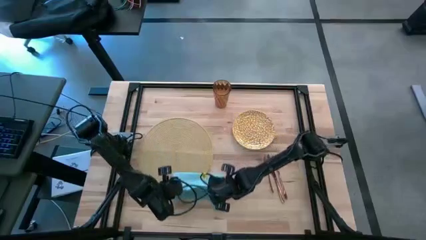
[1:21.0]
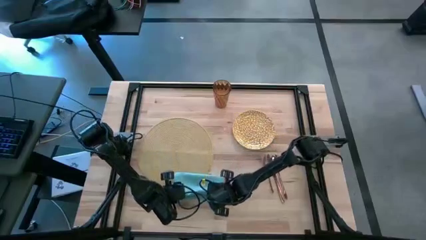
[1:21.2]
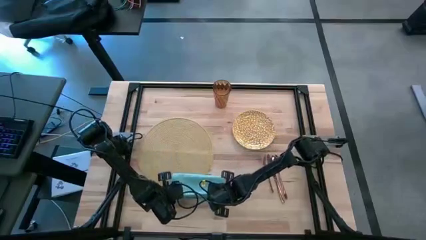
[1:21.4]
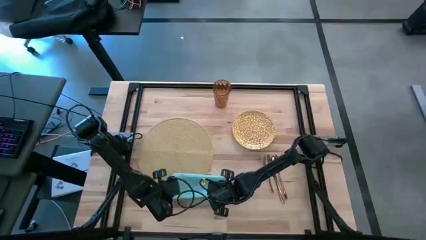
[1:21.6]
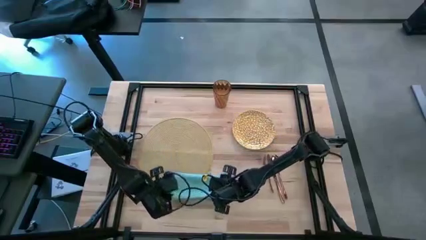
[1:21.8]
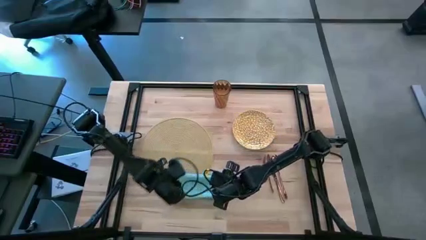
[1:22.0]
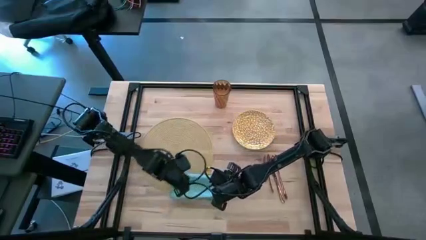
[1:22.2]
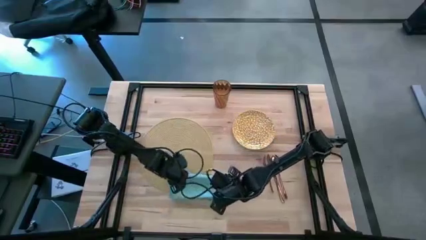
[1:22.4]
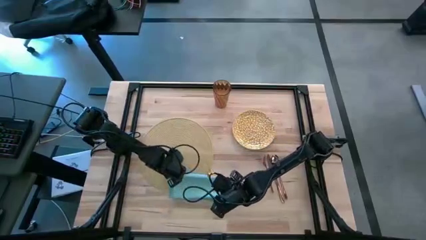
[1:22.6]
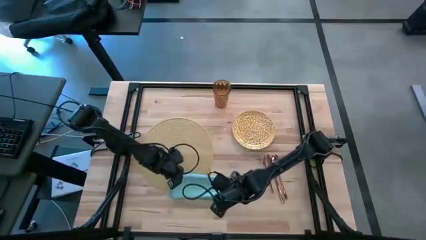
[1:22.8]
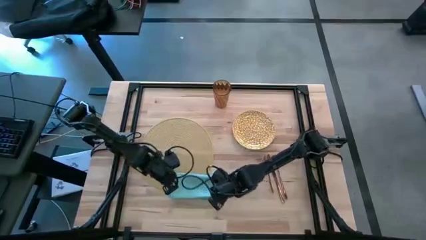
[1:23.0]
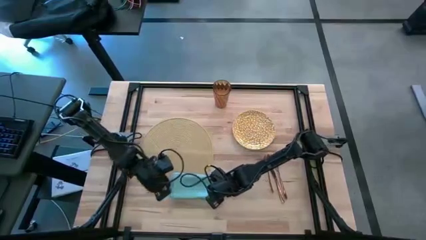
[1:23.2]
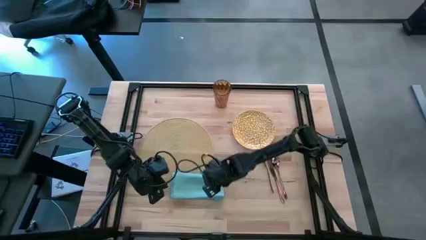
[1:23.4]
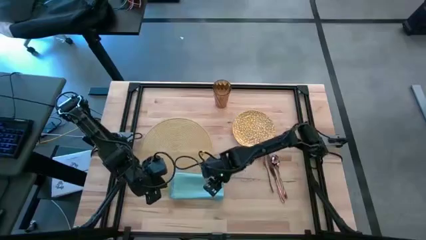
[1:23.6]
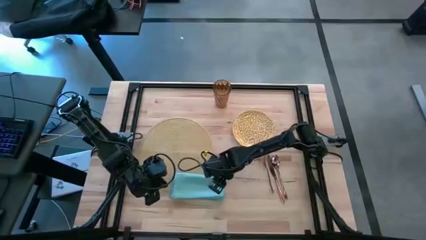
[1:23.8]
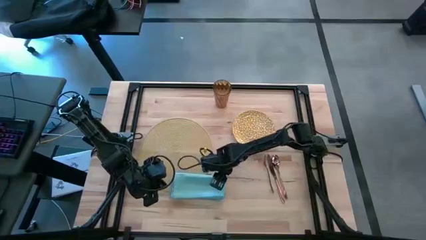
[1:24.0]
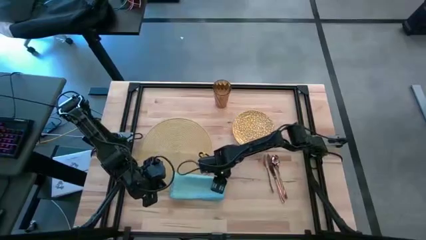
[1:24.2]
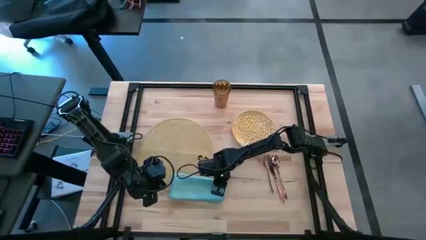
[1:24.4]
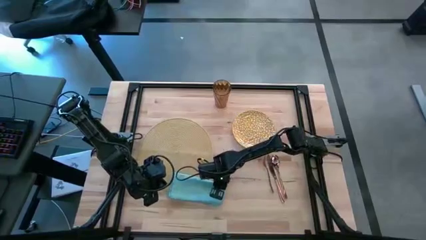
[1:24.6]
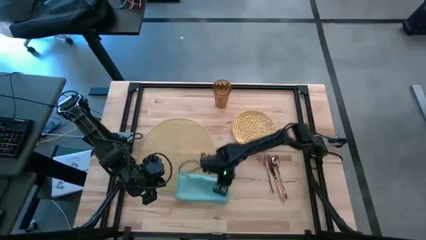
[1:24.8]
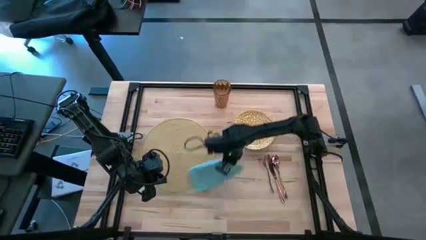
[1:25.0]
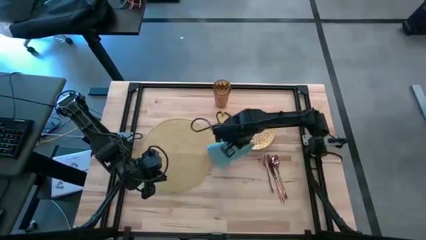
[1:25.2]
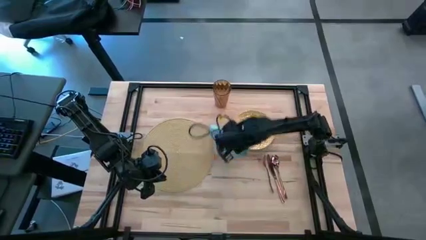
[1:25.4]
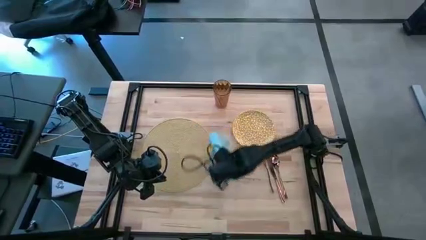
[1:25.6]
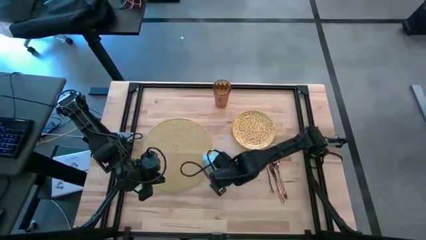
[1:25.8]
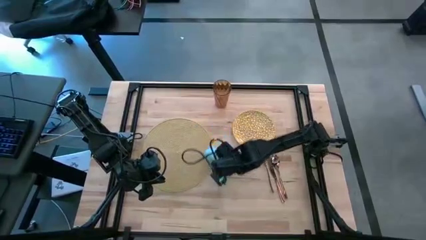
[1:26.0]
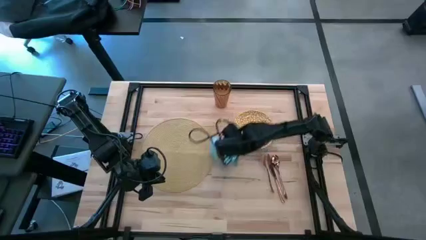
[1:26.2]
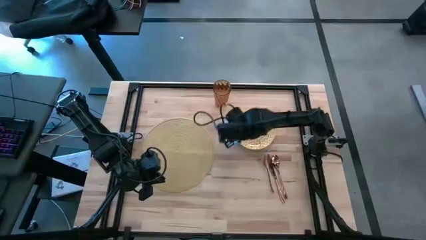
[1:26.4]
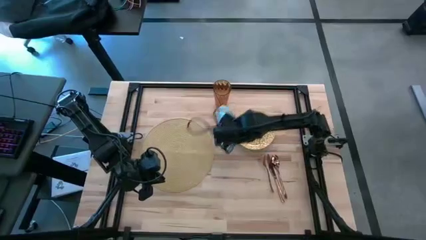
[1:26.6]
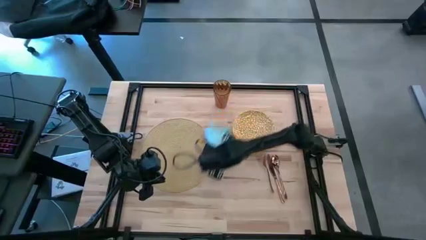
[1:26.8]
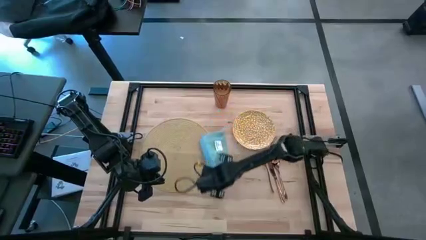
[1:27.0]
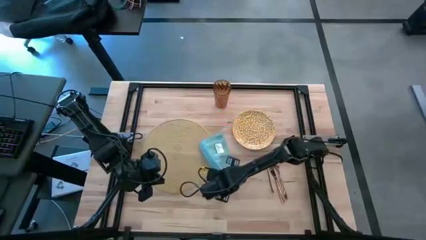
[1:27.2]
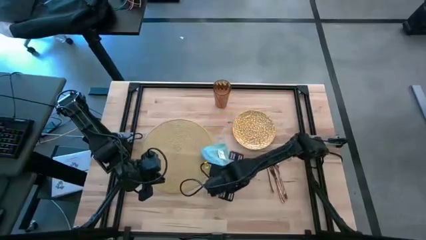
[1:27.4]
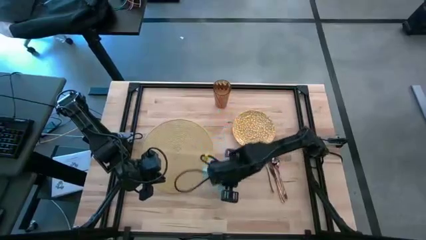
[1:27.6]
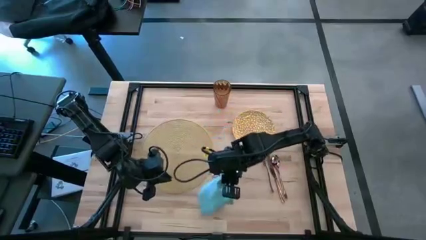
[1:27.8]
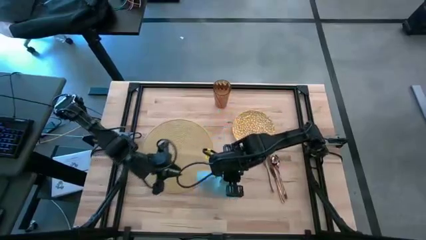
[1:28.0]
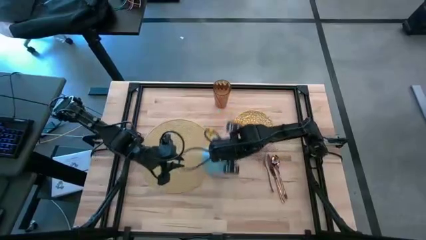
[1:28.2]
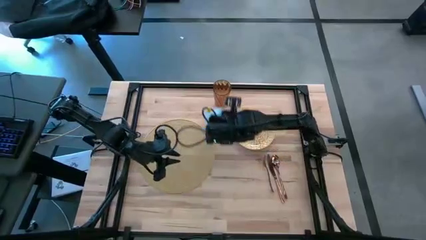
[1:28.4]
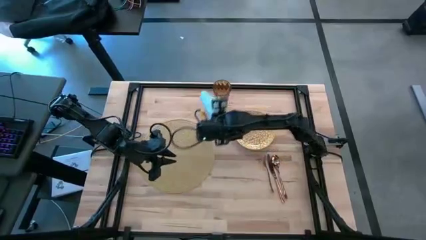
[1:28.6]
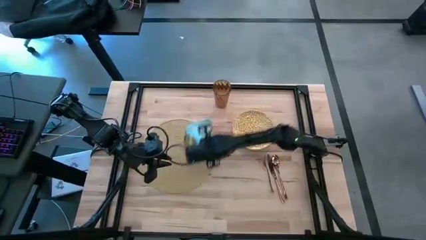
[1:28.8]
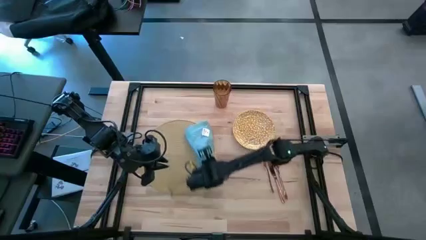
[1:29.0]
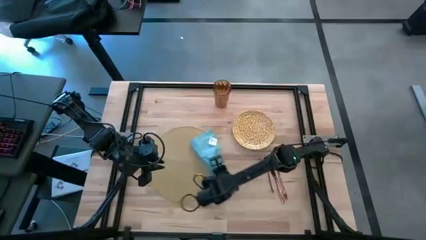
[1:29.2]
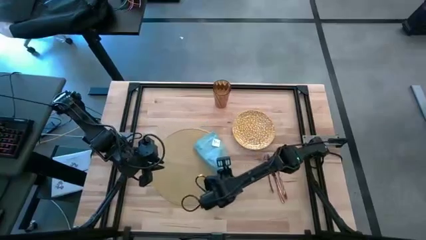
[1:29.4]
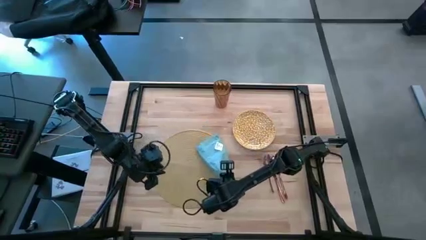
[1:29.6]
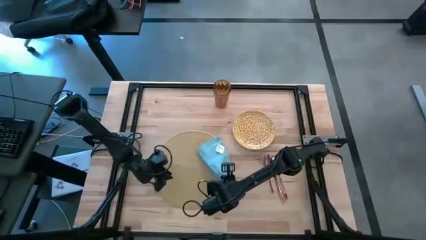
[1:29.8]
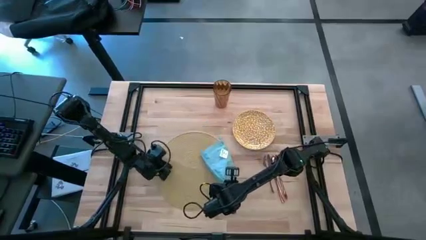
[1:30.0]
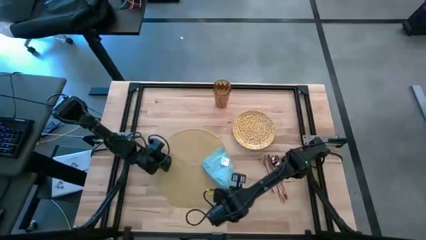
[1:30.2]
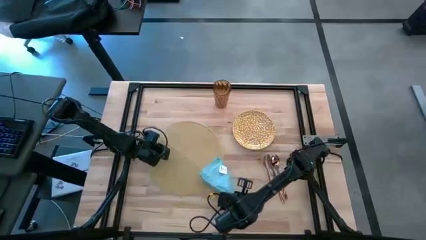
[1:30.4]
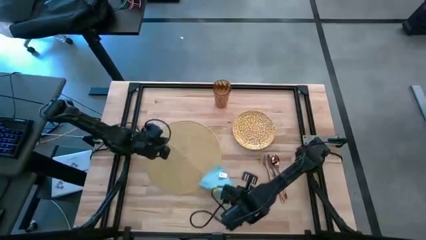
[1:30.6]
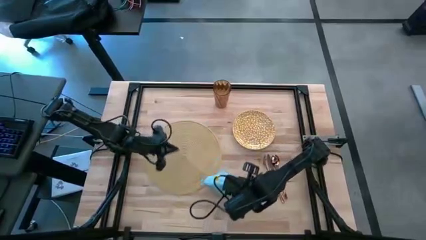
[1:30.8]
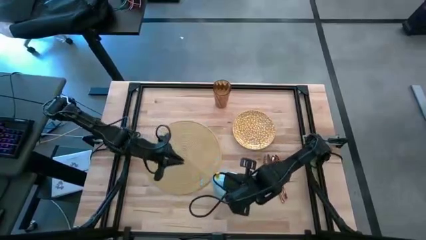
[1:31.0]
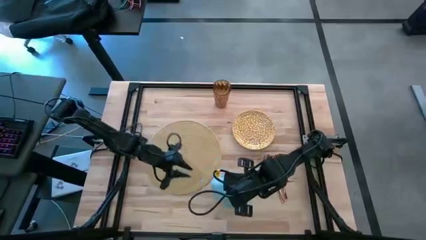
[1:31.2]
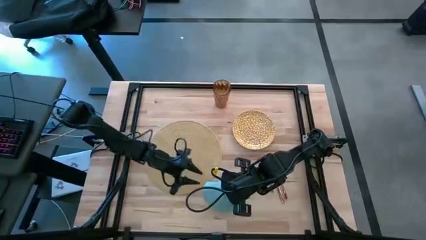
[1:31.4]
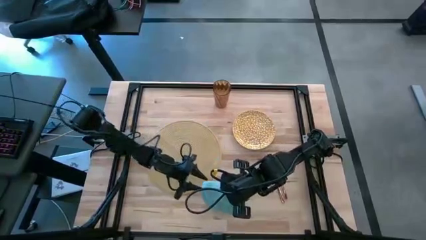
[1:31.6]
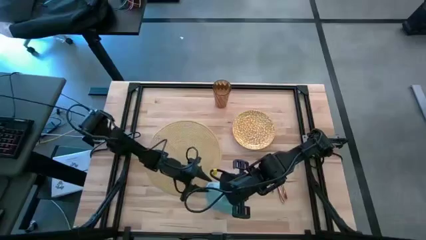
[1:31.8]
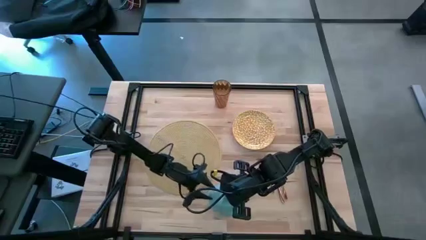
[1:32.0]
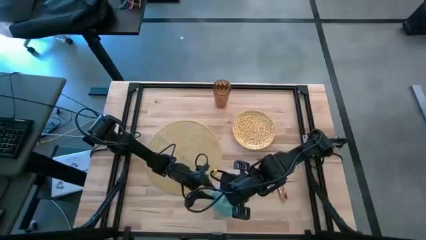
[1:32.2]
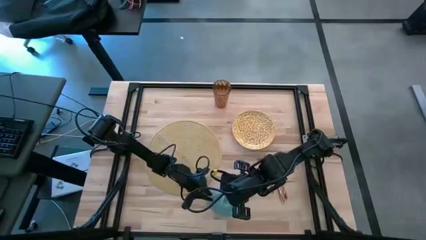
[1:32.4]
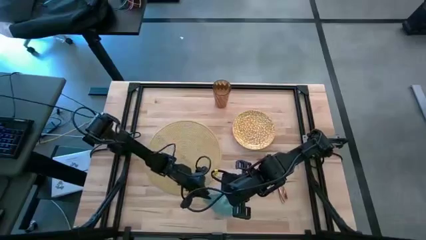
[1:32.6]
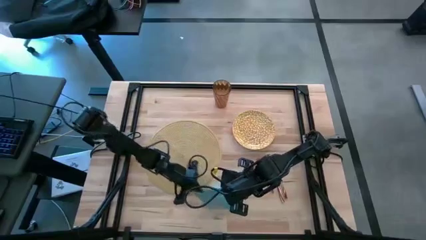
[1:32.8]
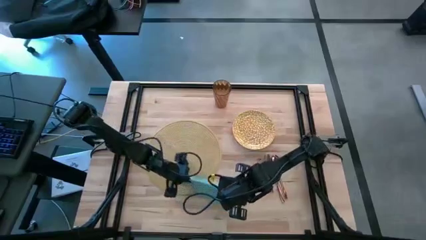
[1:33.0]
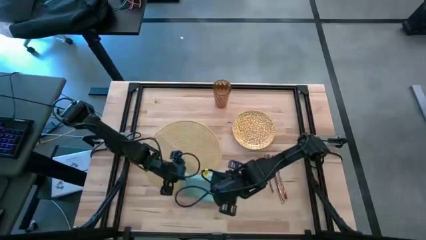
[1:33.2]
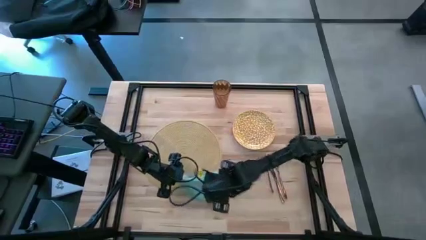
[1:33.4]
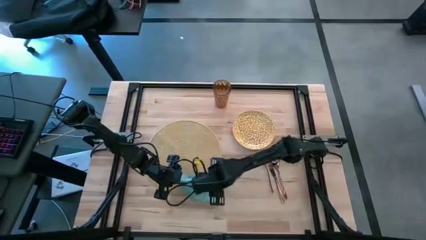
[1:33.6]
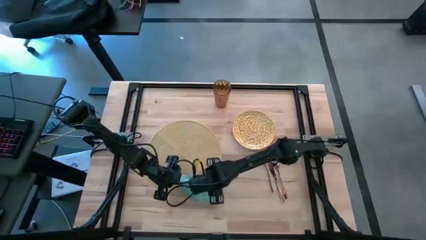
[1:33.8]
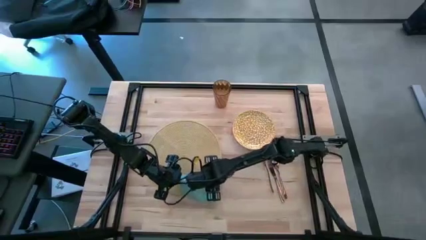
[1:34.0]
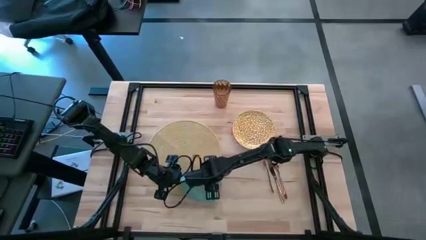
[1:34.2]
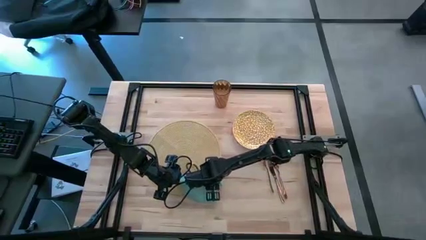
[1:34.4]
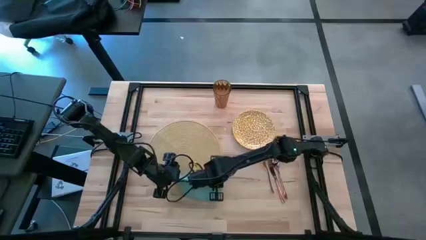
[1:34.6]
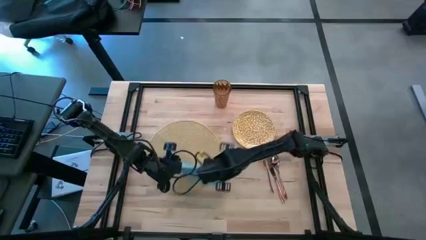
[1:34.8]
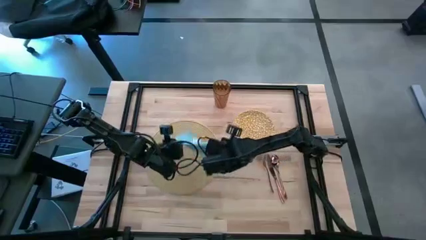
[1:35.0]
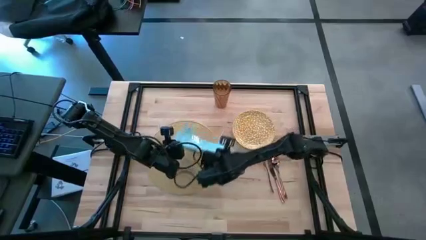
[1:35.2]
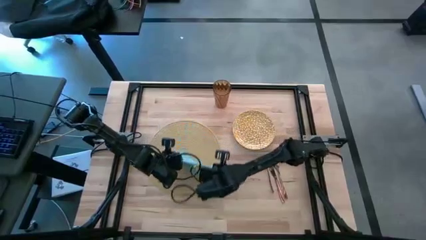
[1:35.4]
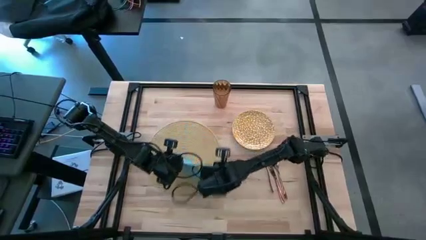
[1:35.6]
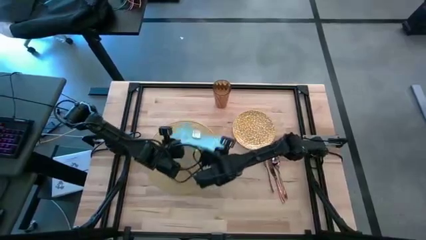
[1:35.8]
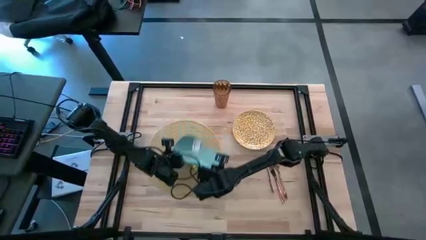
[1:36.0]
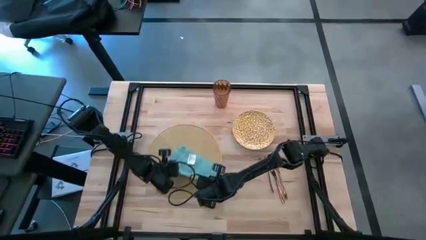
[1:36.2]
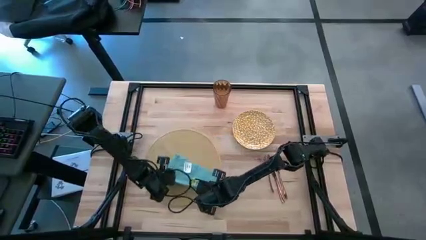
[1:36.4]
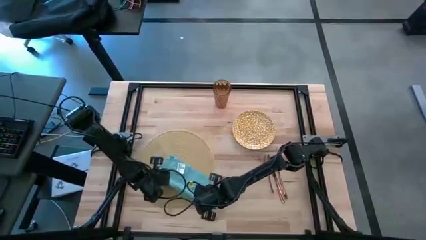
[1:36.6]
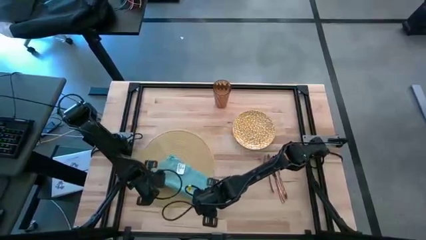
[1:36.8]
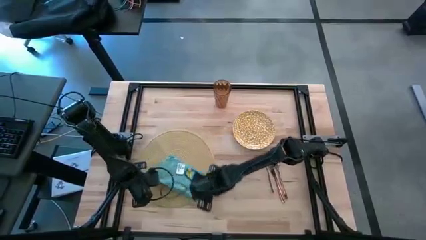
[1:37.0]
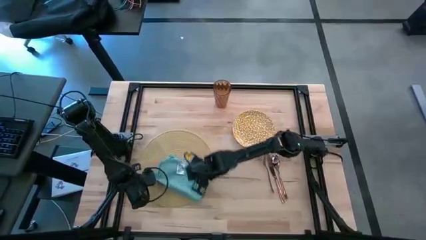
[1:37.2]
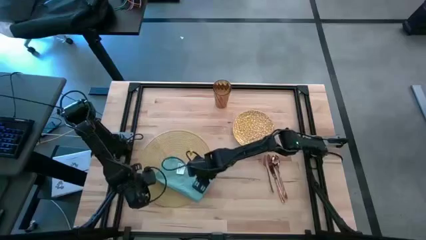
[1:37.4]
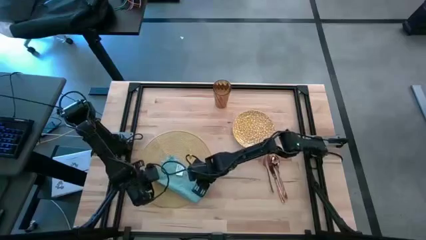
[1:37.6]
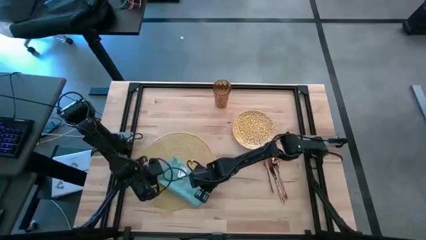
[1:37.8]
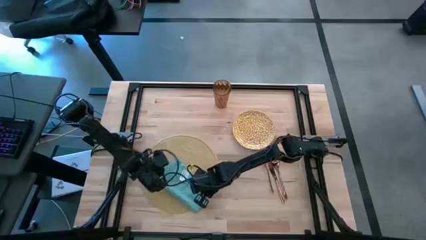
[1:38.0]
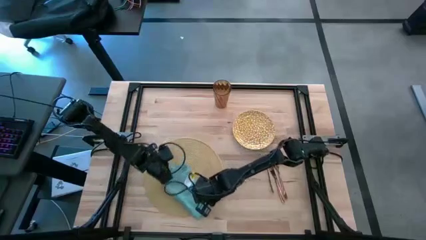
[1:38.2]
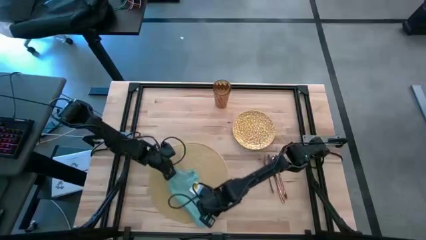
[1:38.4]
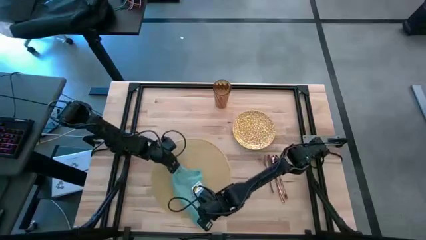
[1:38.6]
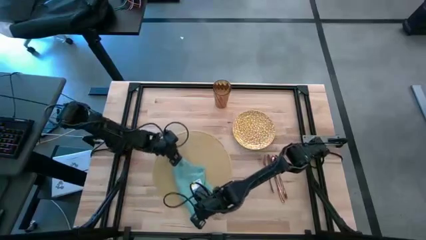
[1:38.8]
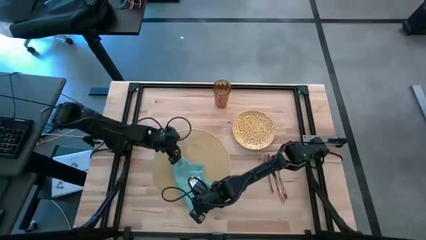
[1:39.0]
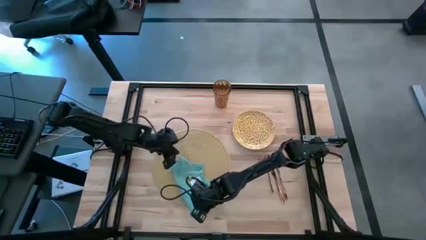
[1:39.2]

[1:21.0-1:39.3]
Task: Set table place
Fold the blue table napkin

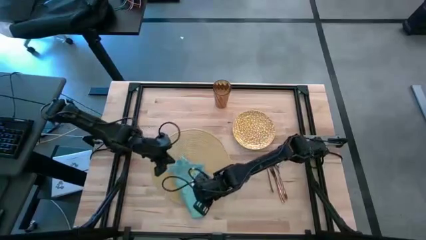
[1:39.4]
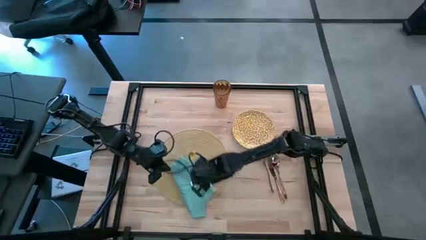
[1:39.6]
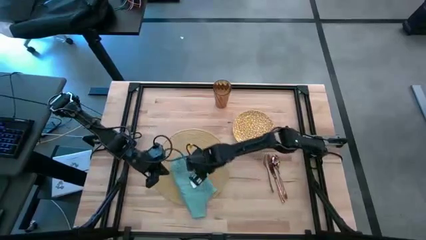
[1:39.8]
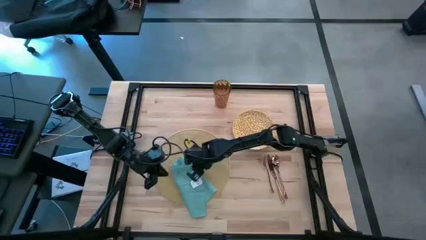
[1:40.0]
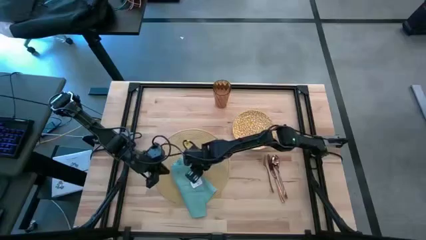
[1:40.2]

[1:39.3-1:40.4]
Fold the blue table napkin
